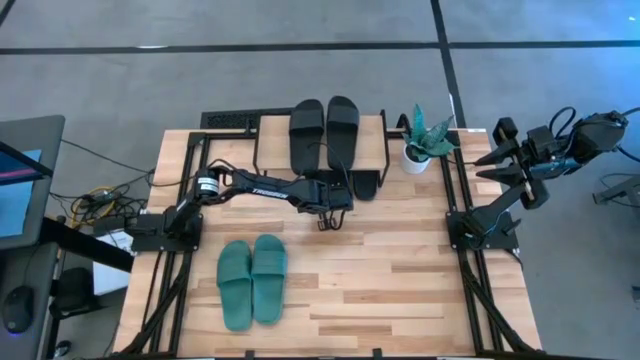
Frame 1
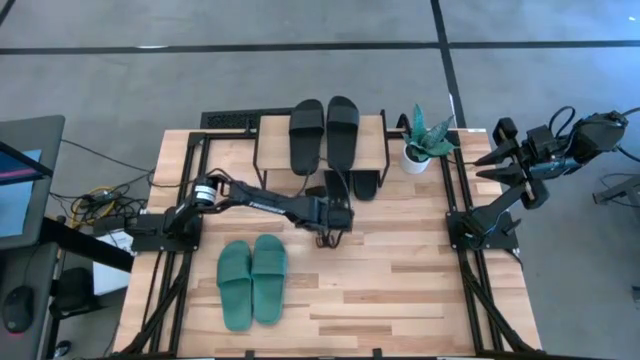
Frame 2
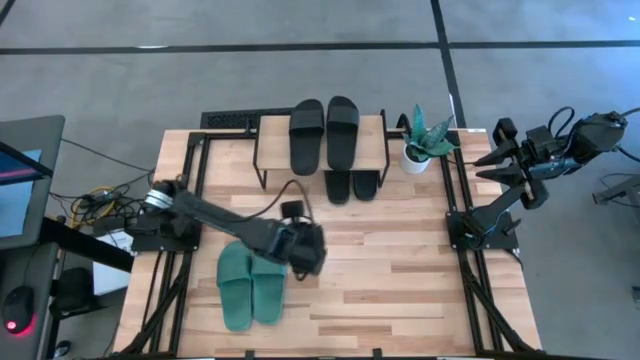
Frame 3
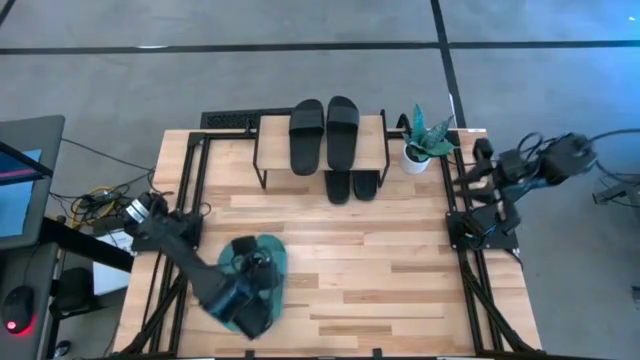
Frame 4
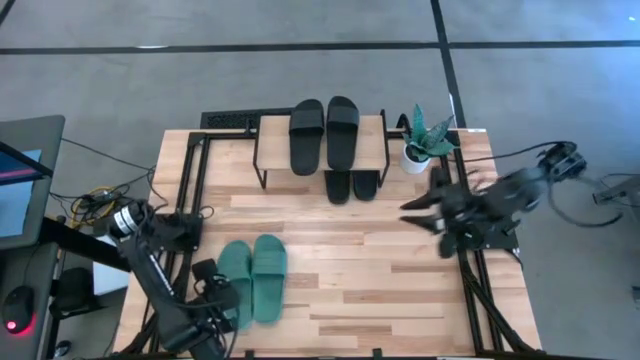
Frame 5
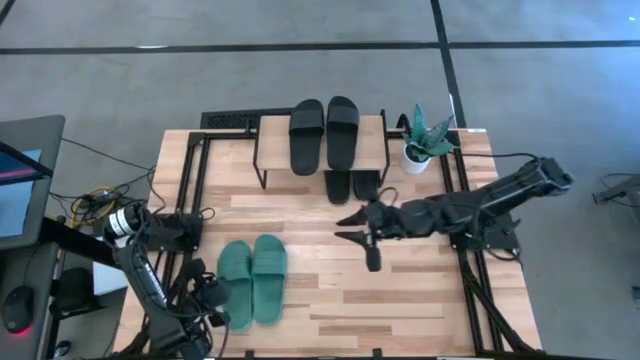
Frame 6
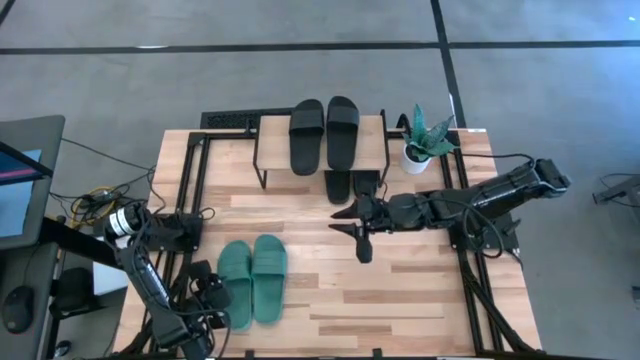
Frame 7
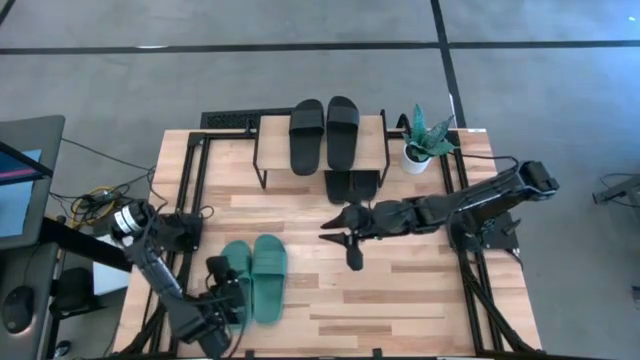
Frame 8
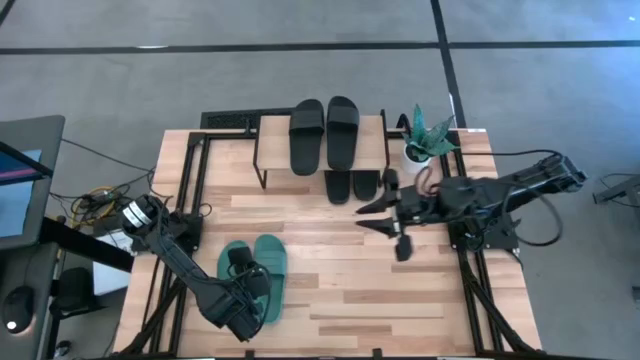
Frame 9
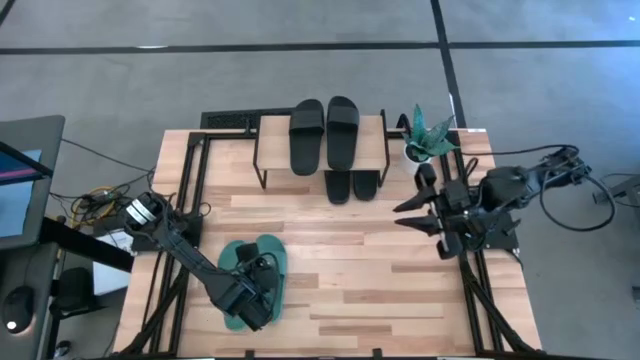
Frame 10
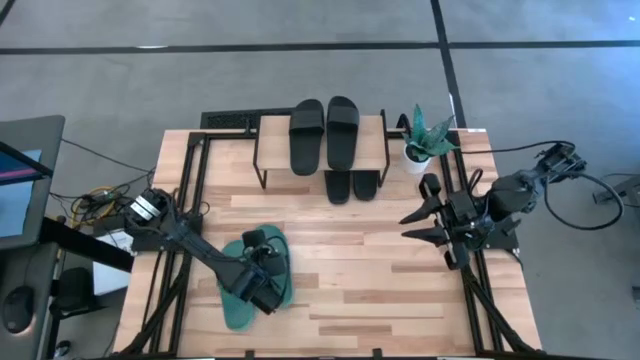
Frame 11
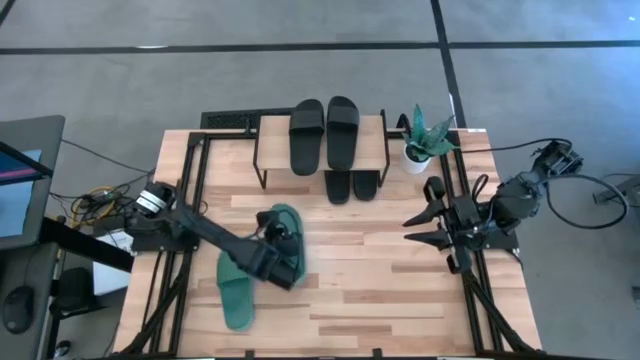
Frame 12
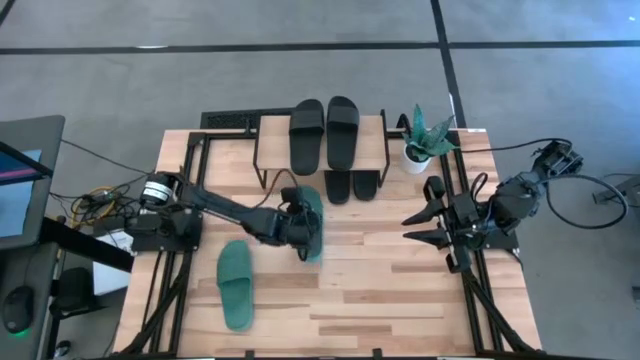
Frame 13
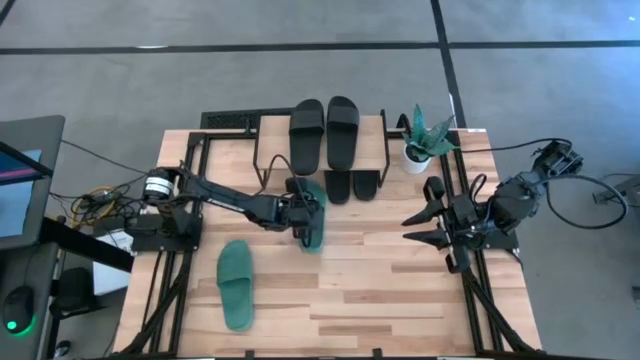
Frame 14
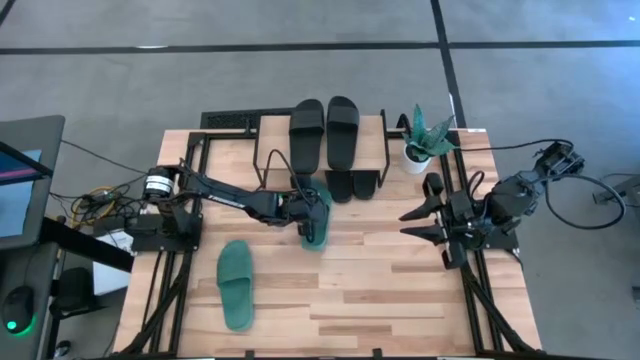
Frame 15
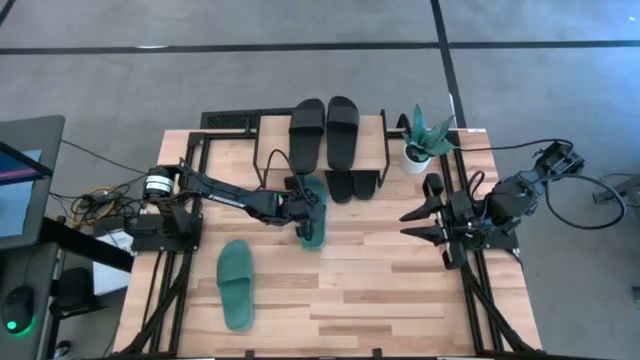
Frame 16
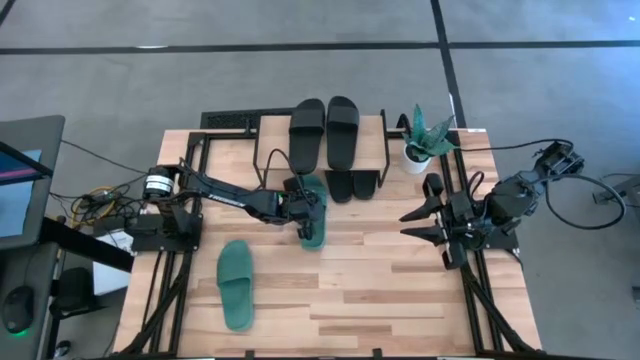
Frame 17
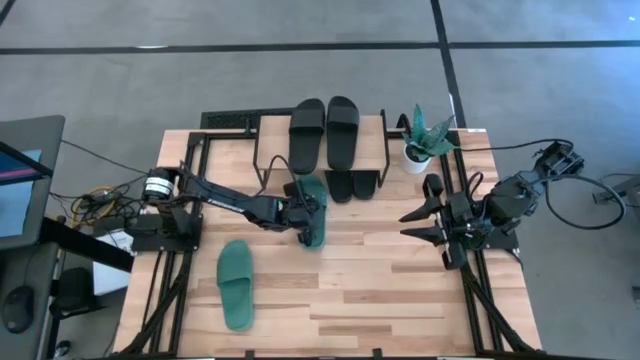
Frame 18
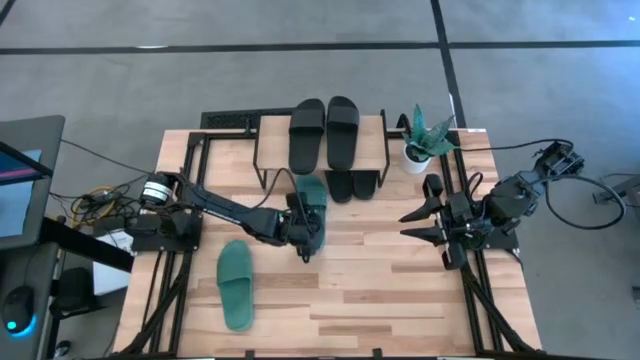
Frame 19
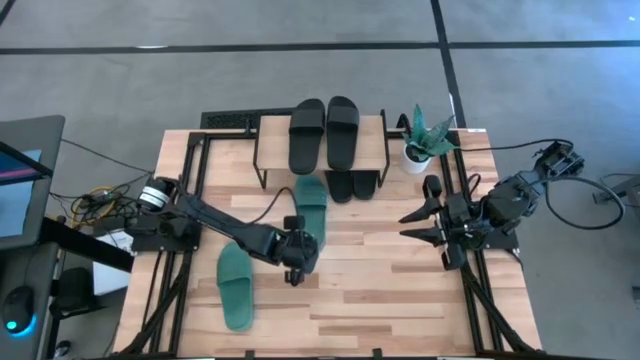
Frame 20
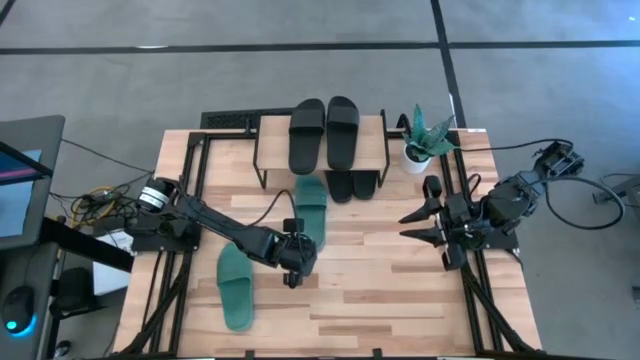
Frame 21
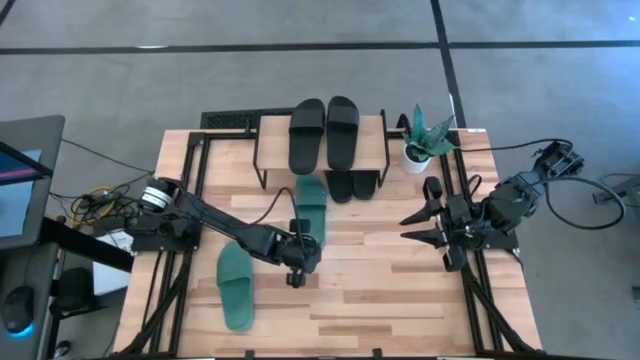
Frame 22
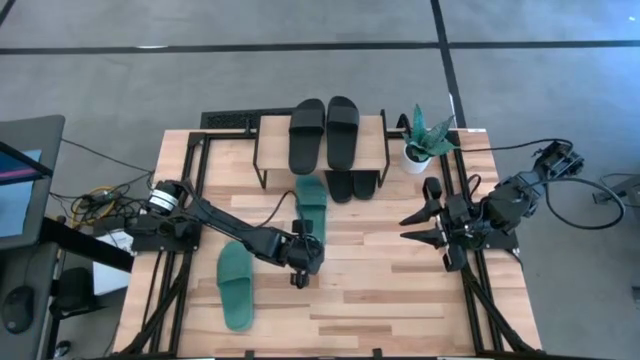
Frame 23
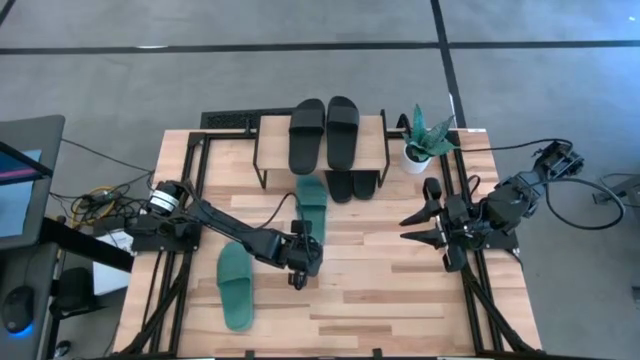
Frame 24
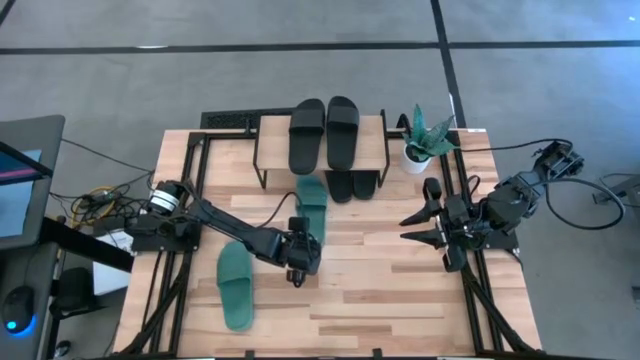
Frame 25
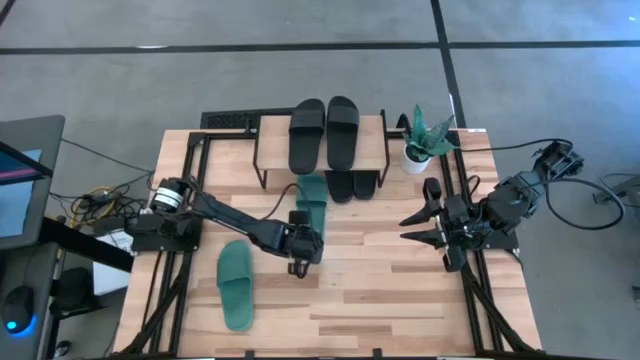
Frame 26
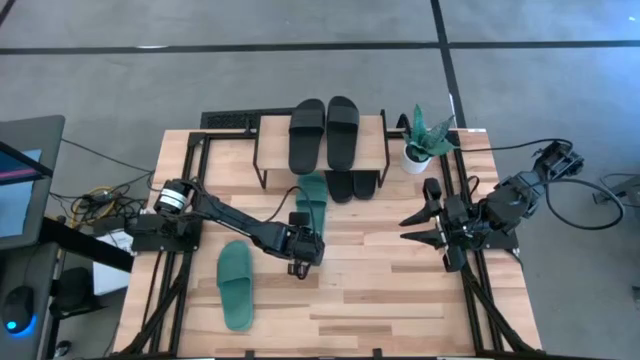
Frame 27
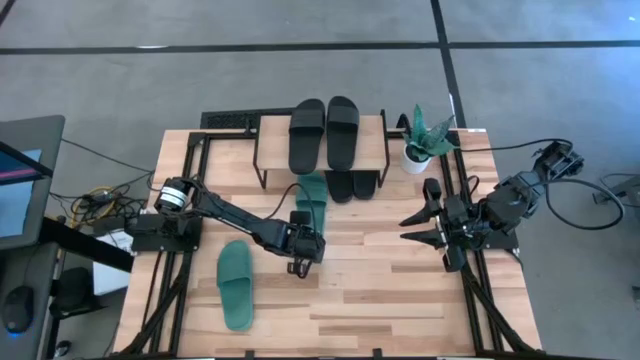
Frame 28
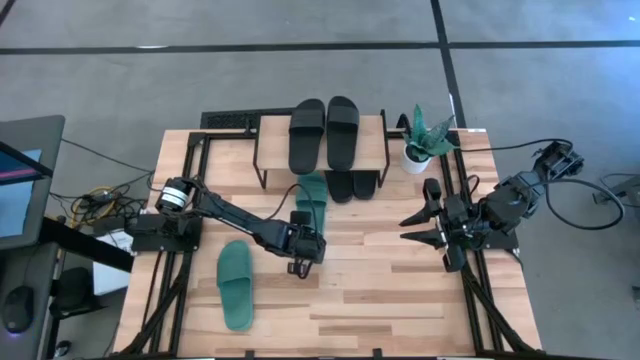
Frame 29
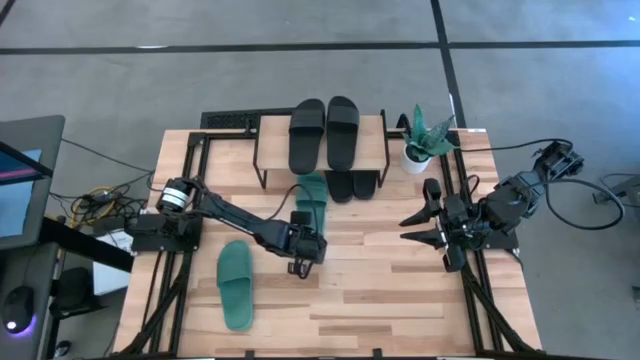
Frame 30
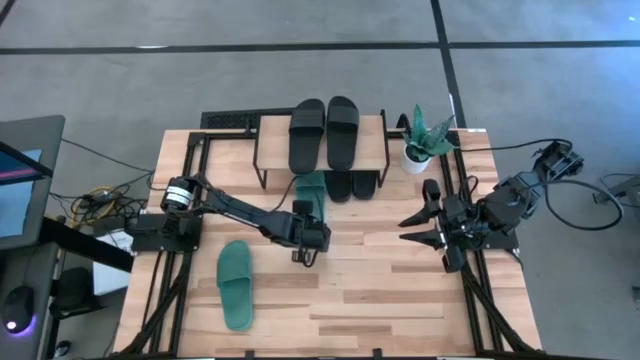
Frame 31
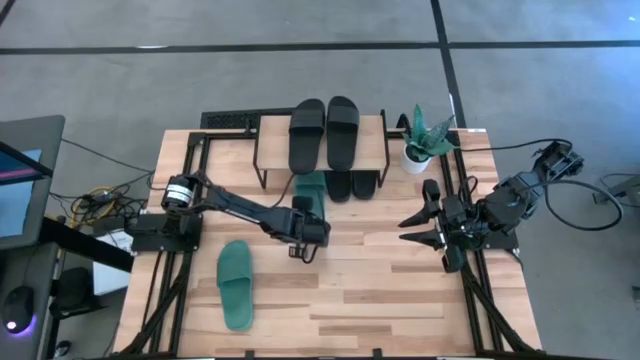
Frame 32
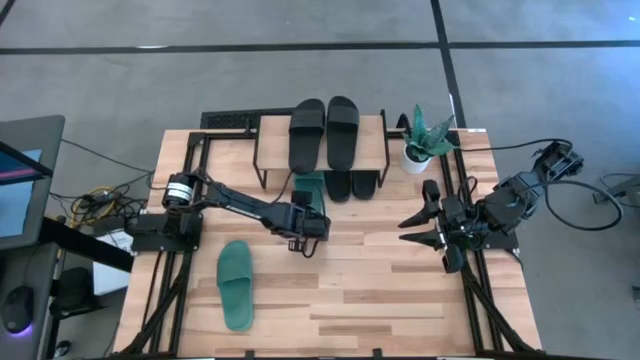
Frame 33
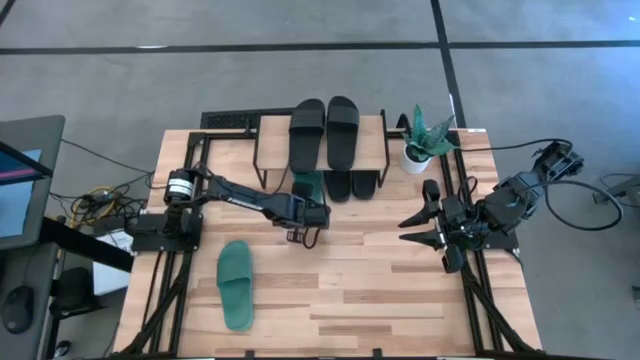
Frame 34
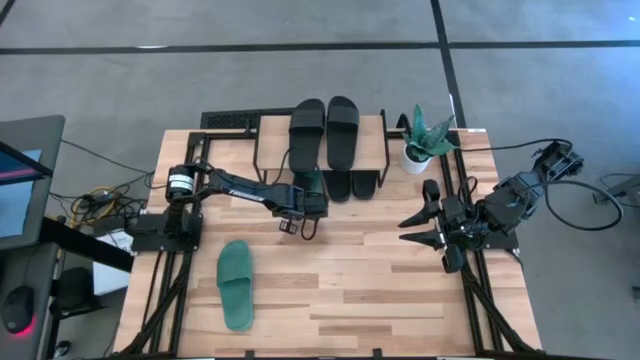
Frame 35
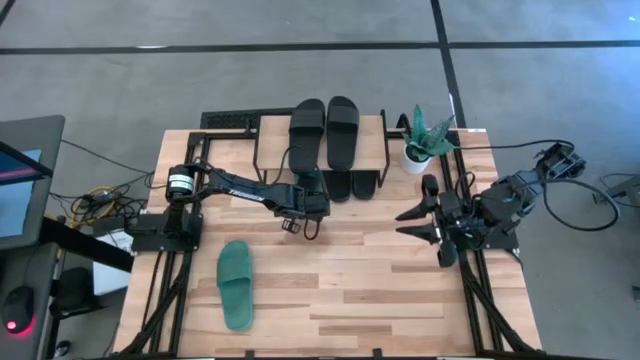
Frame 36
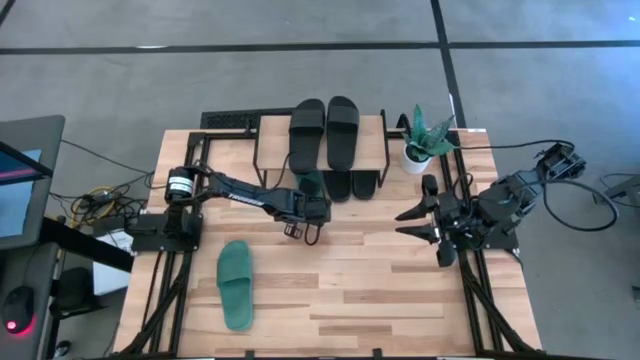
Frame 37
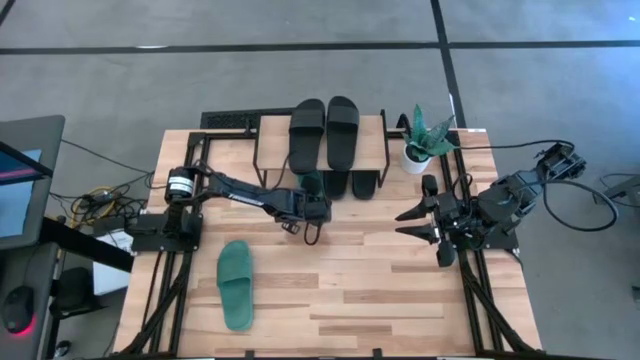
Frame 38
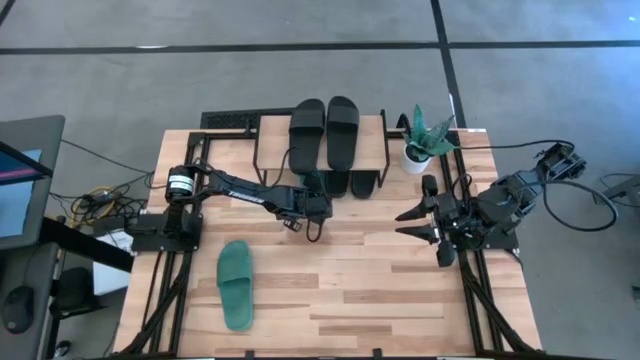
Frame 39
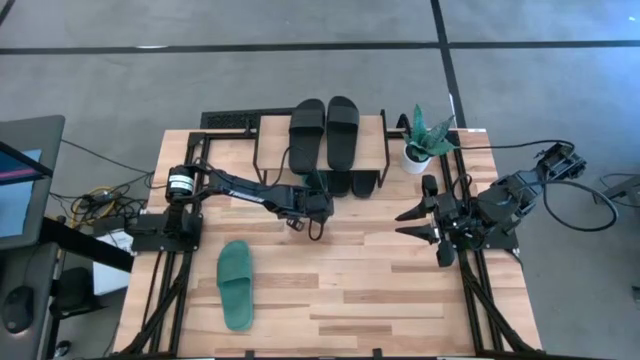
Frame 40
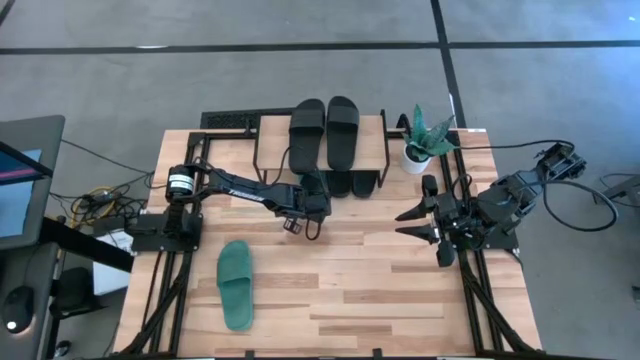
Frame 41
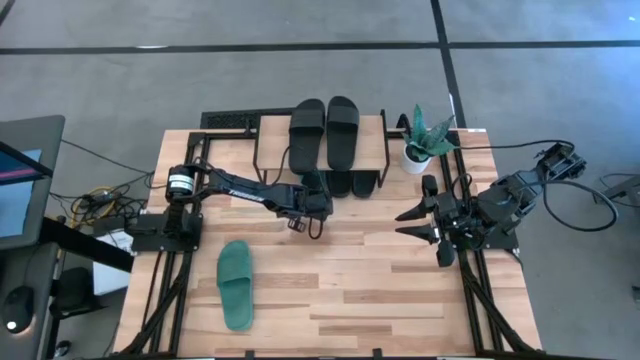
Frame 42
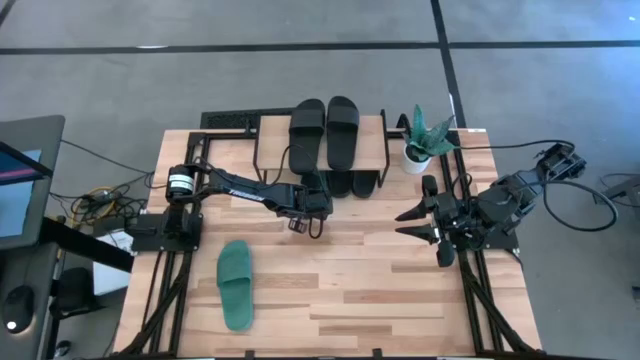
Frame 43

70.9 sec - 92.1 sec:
Task: Pick and place slides into the shelf
Put the right green slide under the shelf
